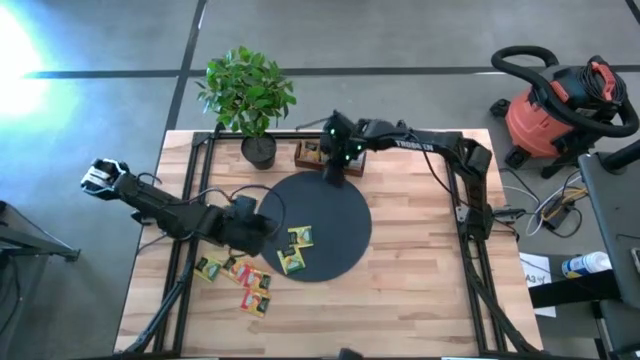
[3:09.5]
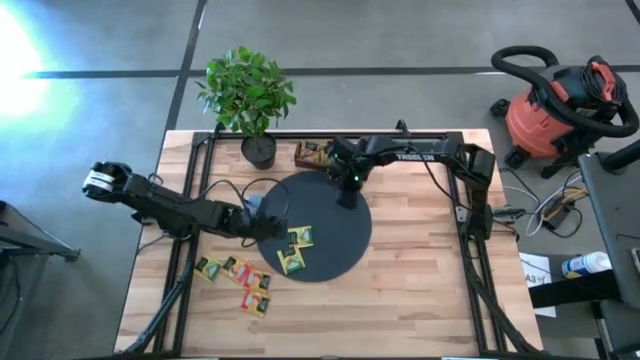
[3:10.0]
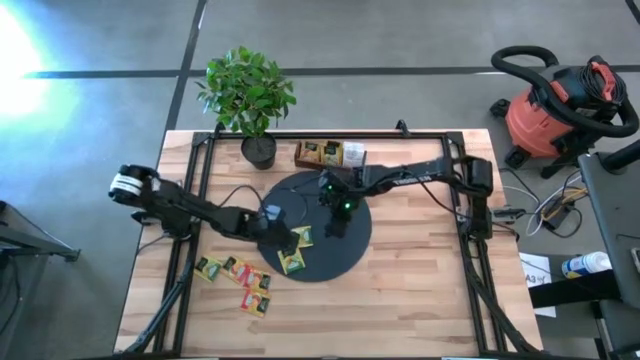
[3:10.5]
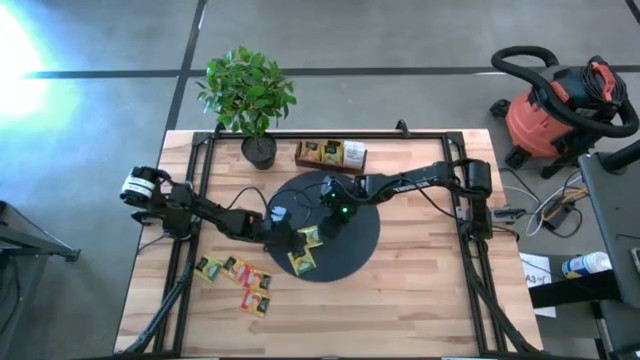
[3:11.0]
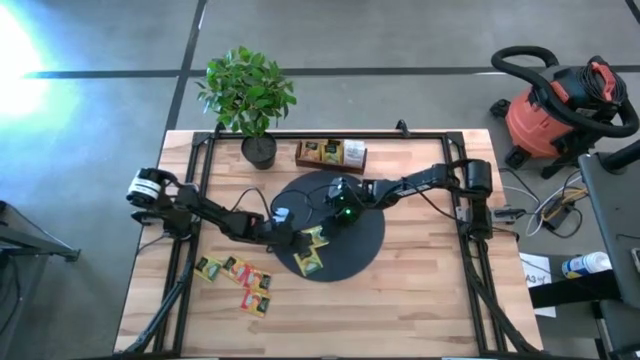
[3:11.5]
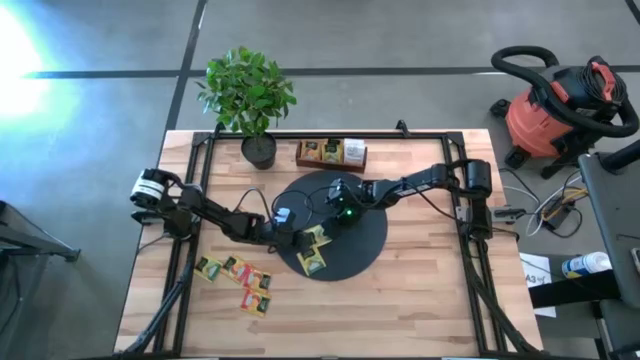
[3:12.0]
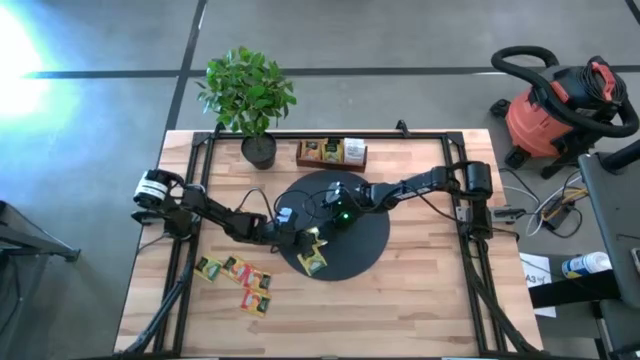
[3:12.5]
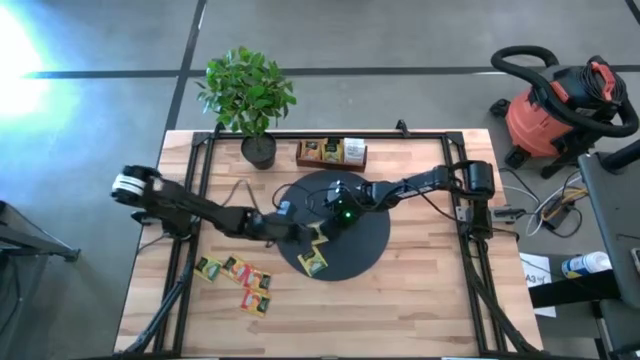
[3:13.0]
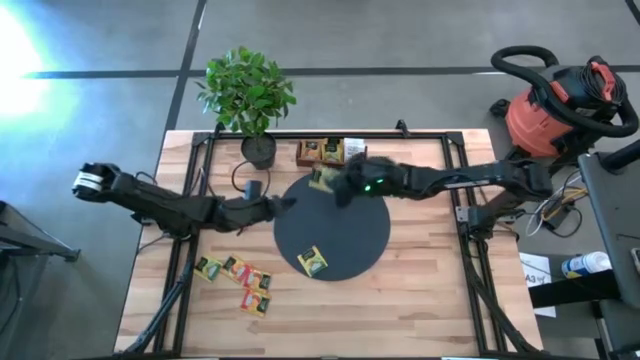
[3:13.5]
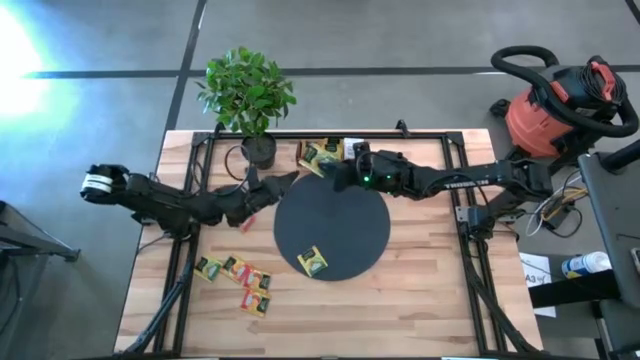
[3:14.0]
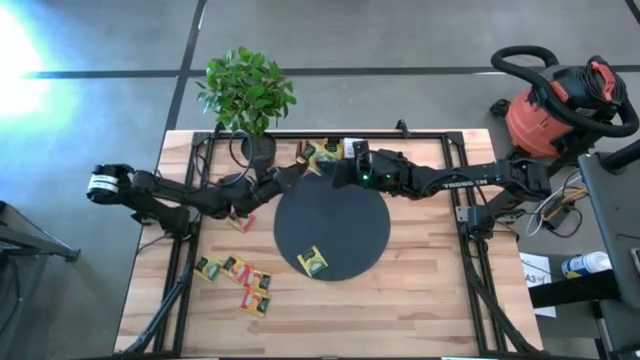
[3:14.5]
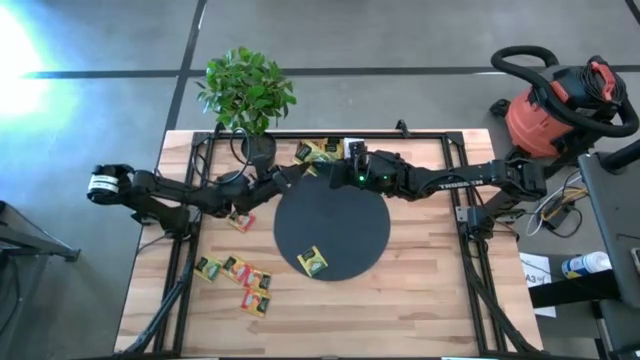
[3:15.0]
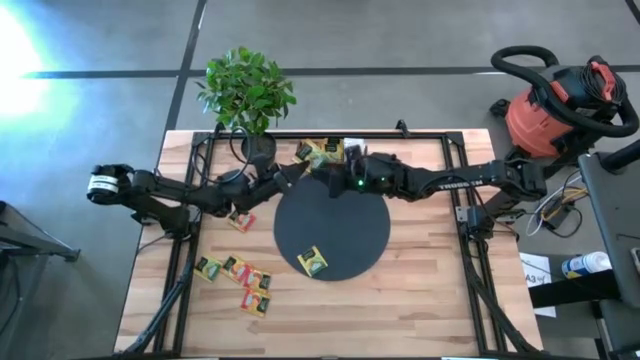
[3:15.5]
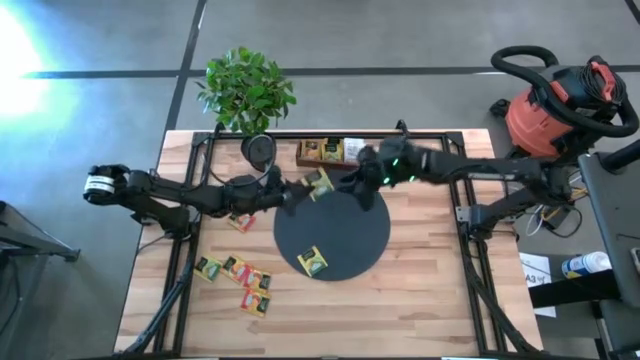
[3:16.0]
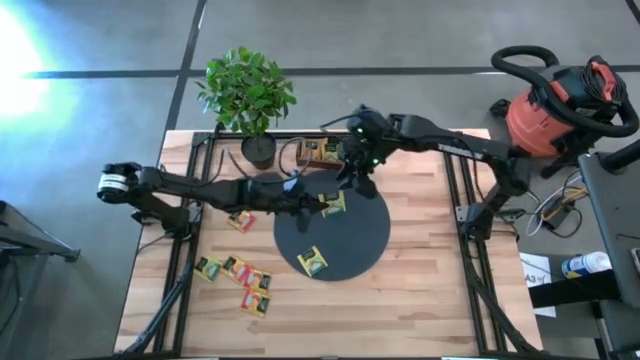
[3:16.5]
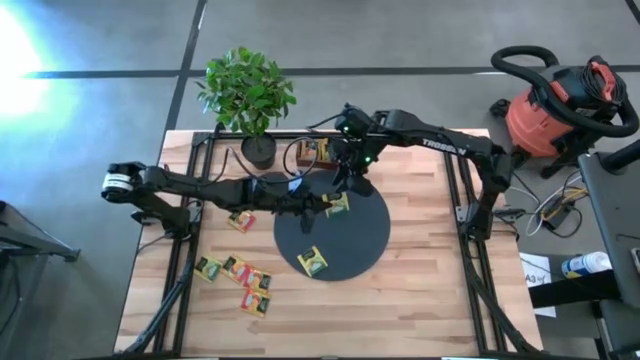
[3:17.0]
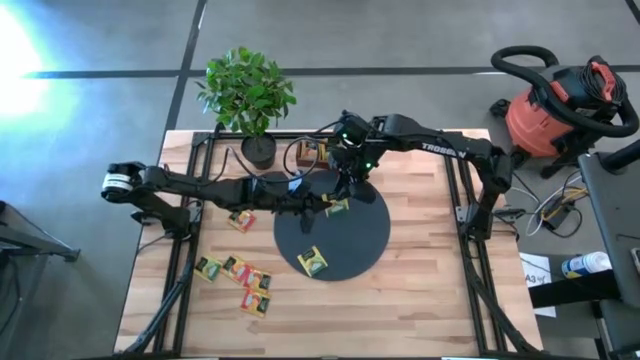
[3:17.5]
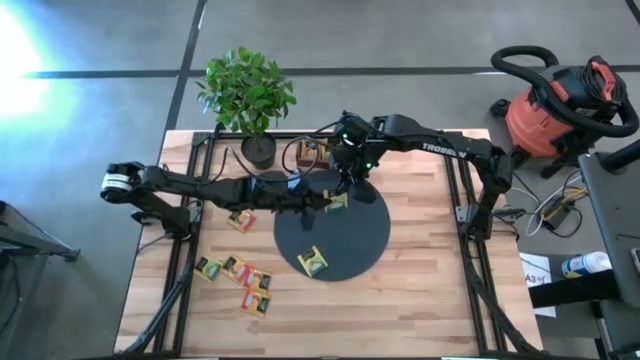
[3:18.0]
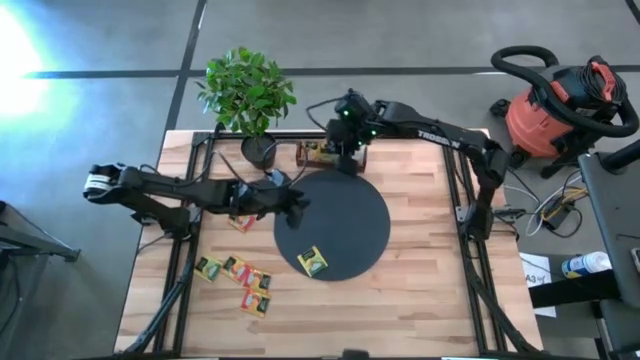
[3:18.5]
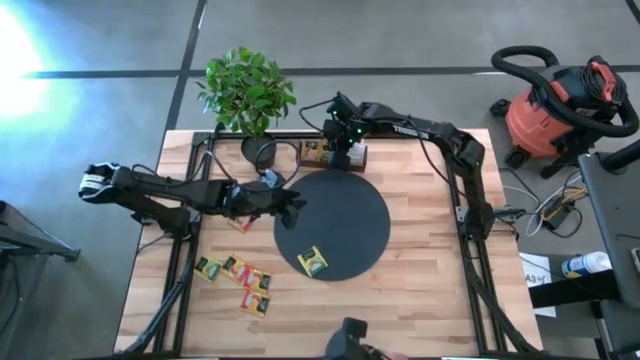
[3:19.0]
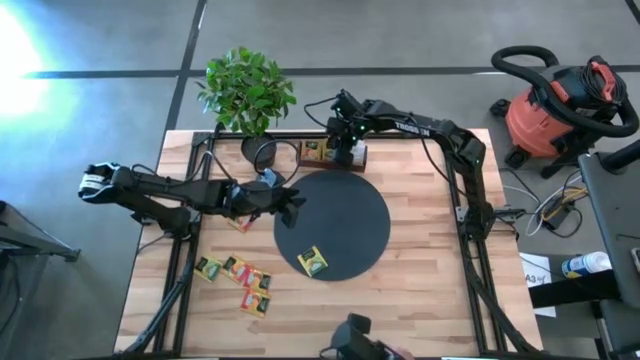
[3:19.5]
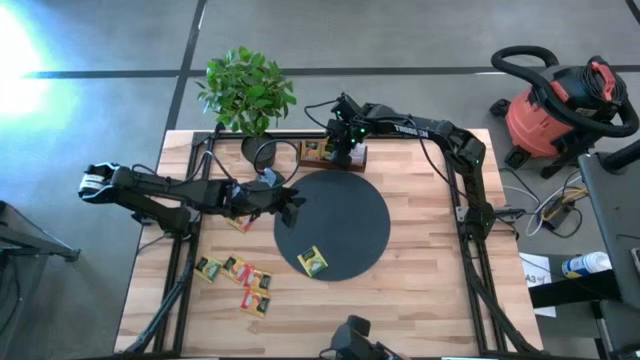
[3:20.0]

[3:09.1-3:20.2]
Task: Pick & Place Tea
Put the top yellow tea bag into the middle slot of the wooden organizer

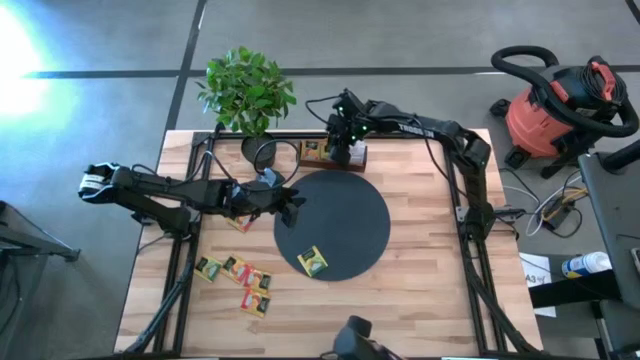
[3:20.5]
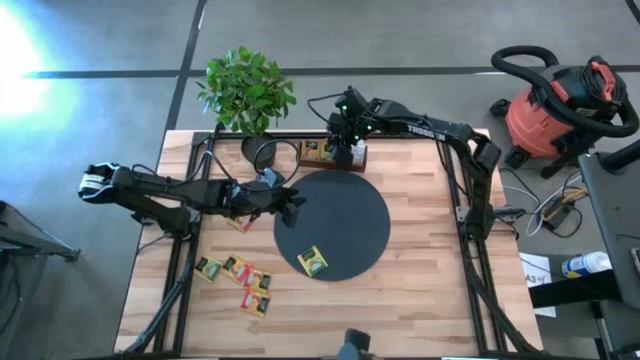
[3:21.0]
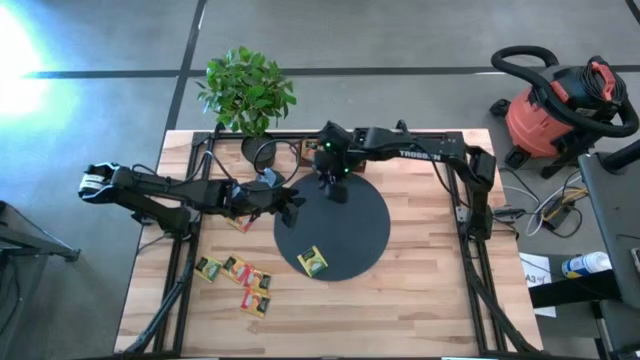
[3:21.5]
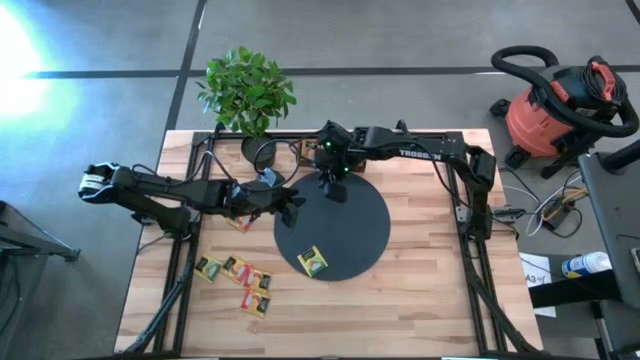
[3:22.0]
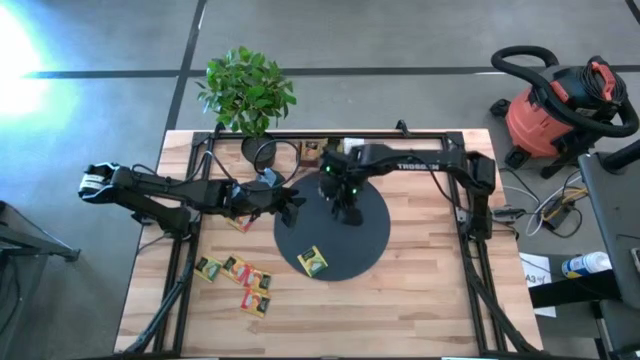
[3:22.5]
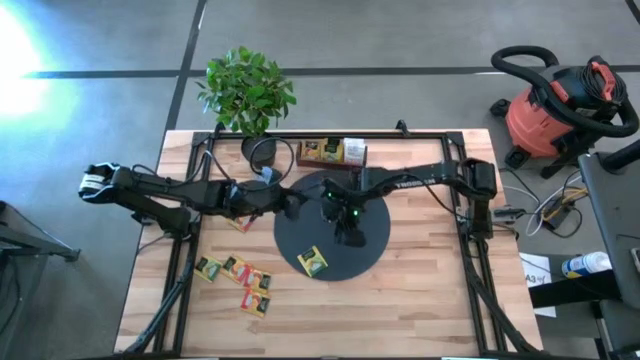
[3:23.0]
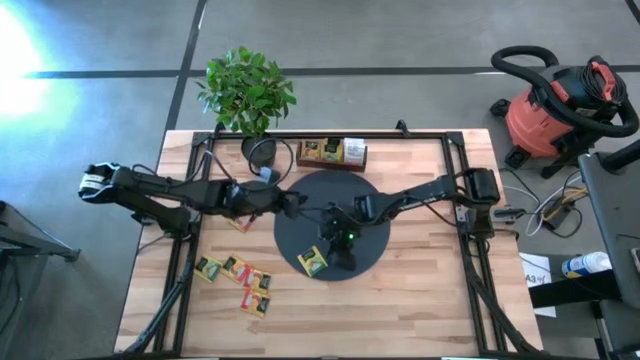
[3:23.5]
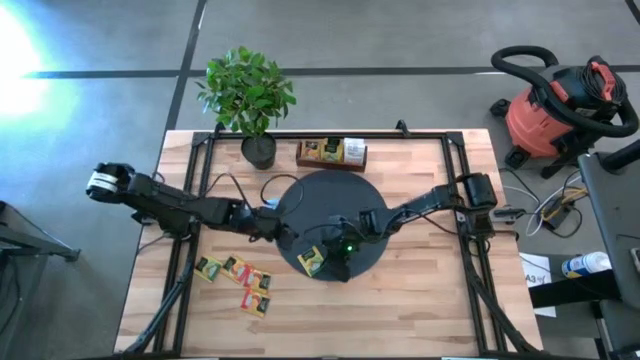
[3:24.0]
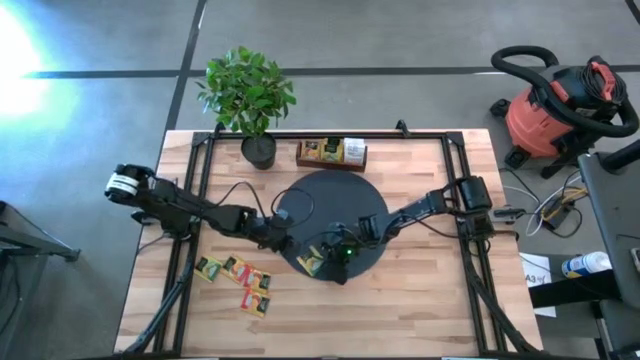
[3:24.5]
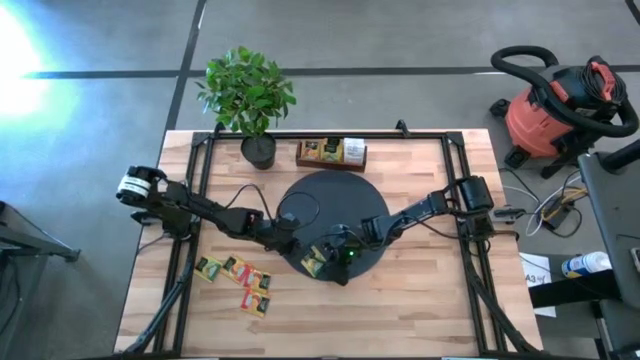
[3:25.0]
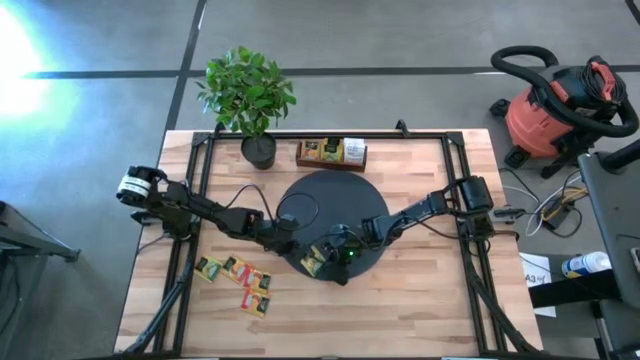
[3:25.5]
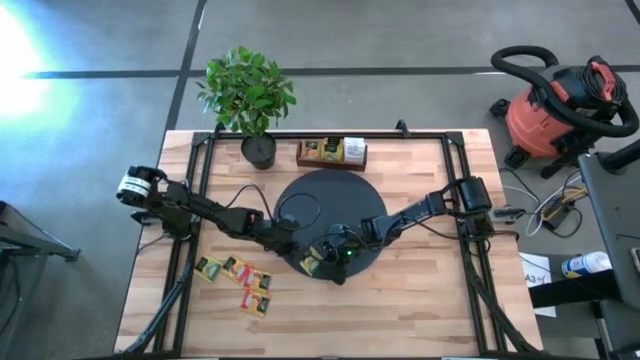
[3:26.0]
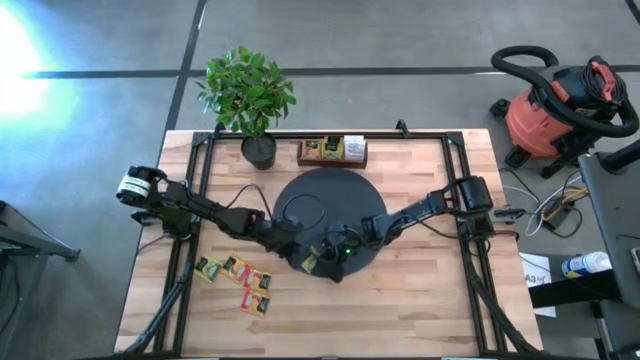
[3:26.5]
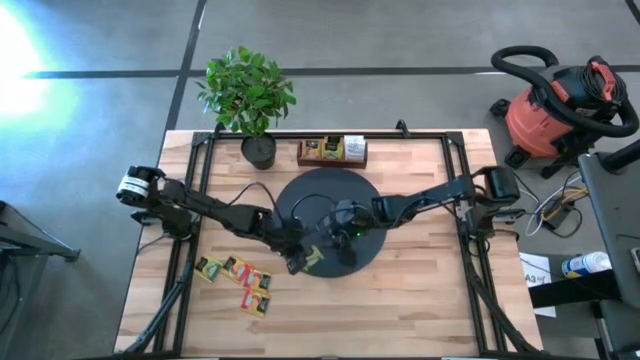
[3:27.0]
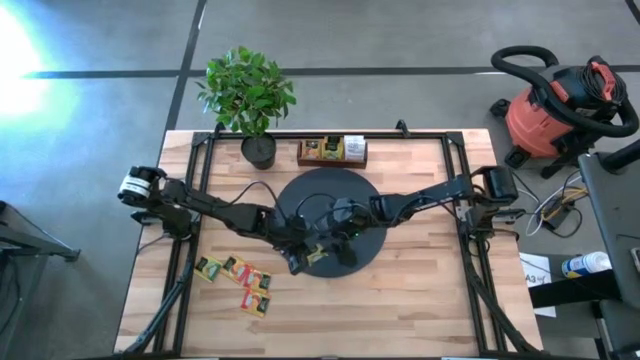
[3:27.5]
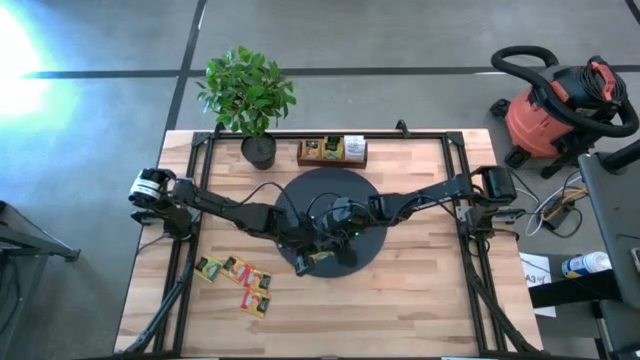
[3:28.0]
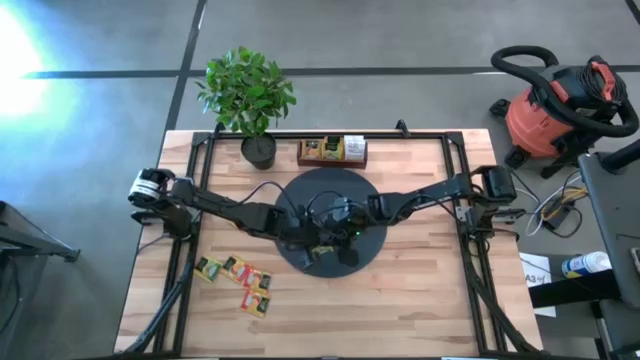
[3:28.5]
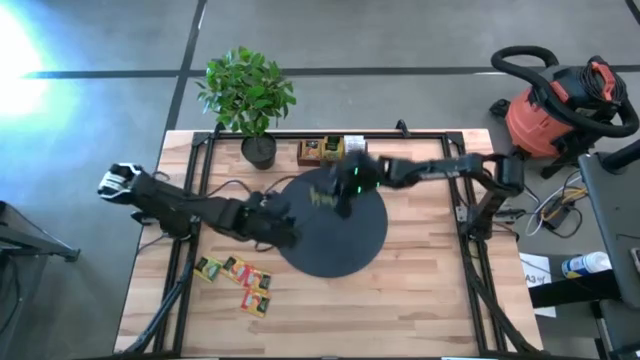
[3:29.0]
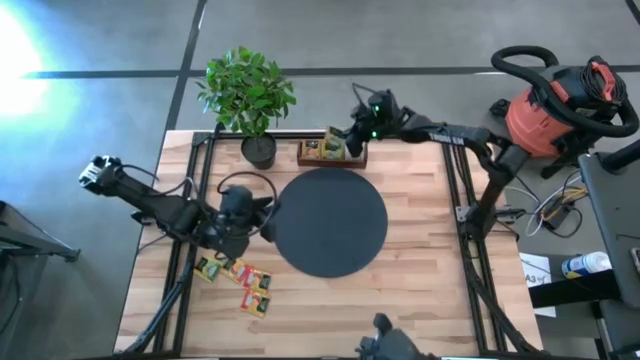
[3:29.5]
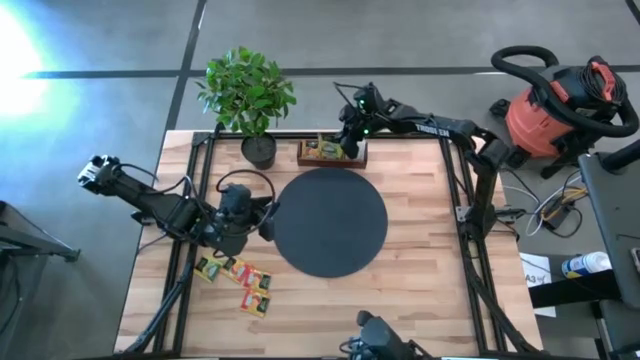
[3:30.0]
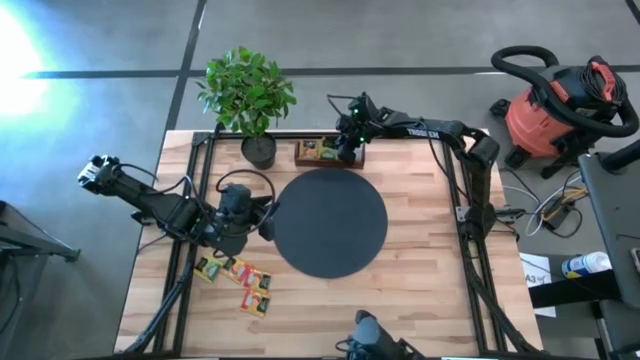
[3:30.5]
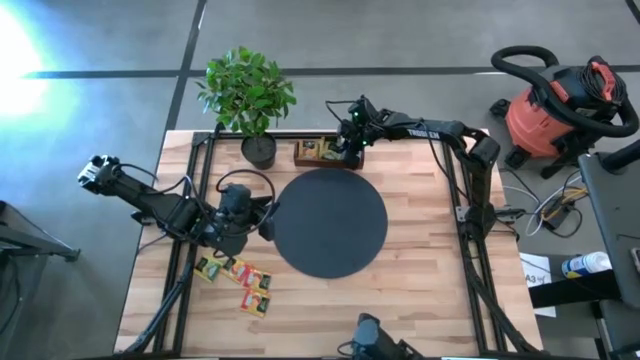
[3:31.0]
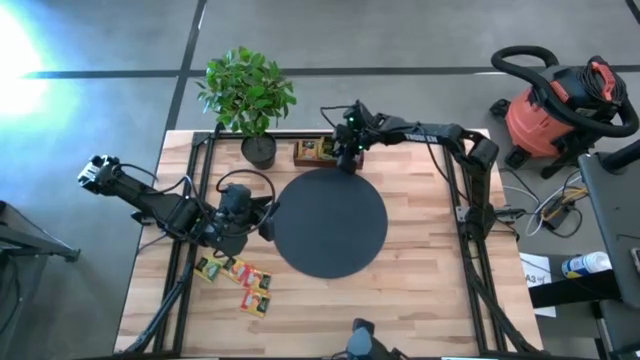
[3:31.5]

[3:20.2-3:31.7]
Put the right yellow tea bag into the middle slot of the wooden organizer
